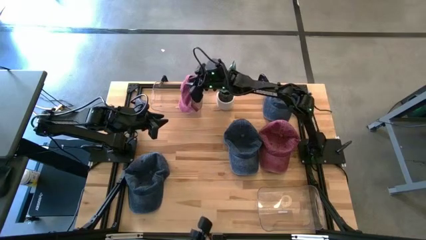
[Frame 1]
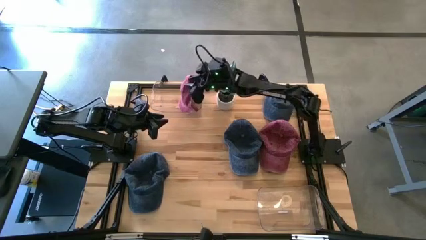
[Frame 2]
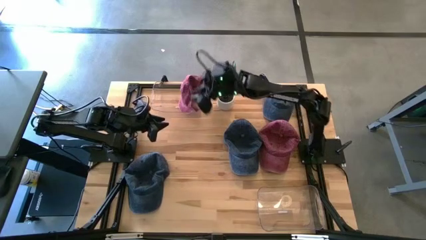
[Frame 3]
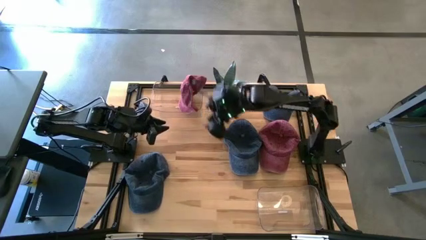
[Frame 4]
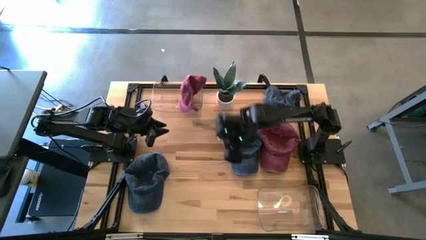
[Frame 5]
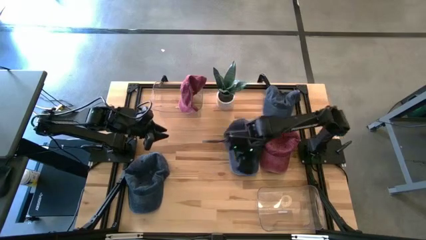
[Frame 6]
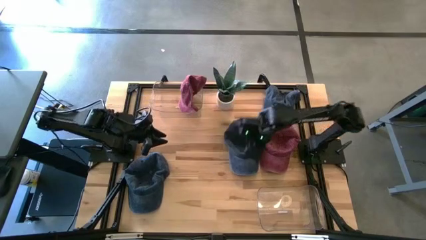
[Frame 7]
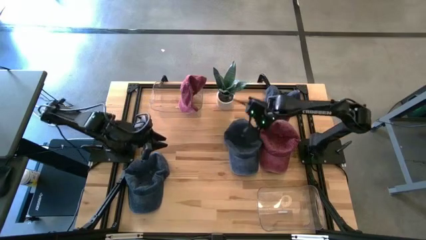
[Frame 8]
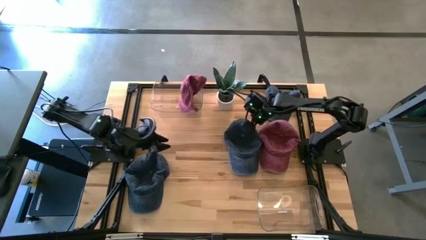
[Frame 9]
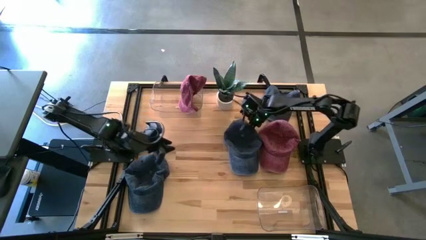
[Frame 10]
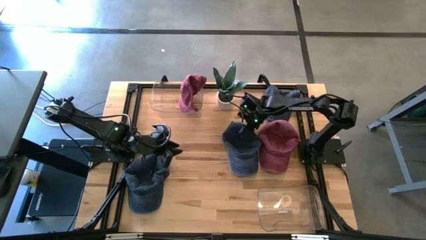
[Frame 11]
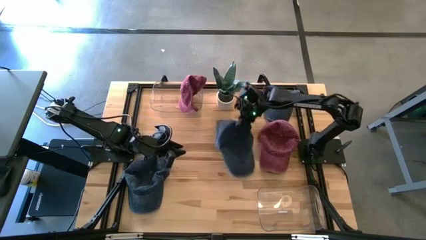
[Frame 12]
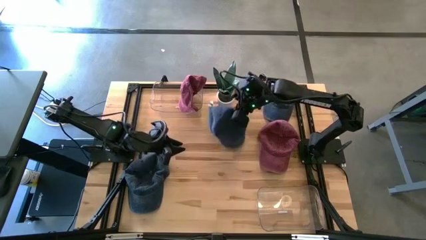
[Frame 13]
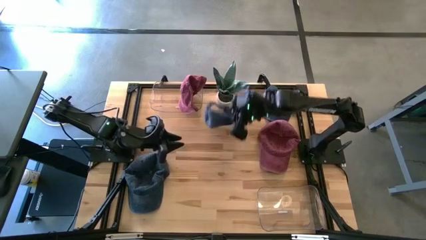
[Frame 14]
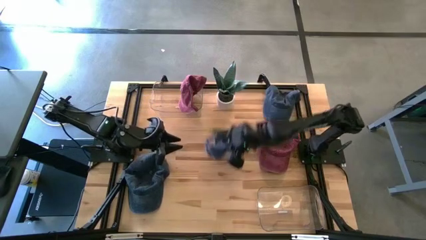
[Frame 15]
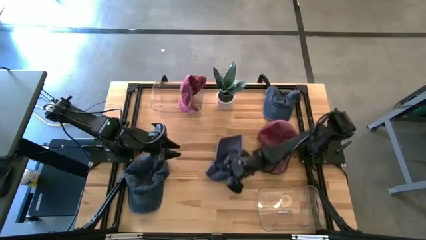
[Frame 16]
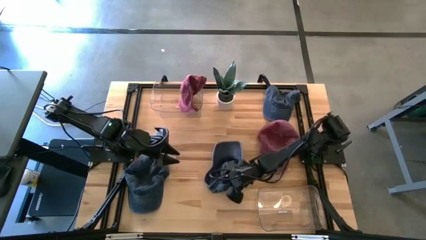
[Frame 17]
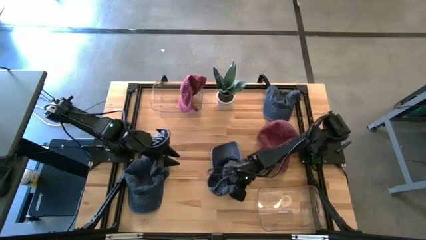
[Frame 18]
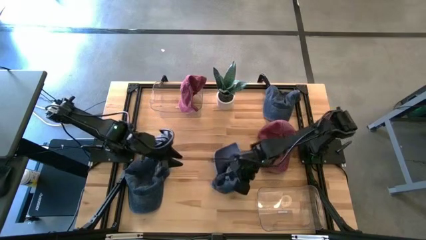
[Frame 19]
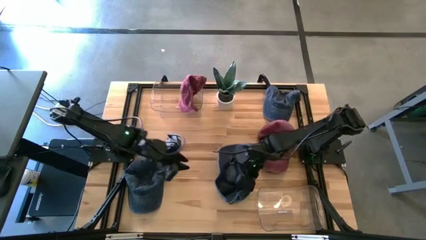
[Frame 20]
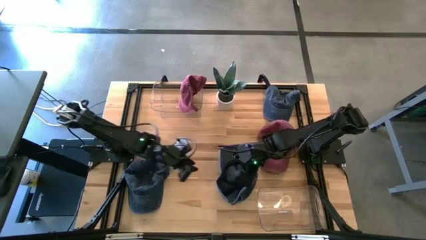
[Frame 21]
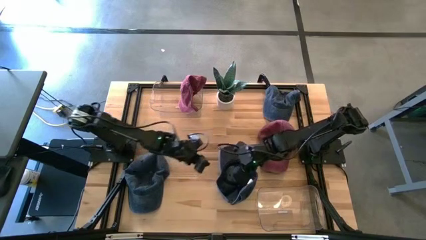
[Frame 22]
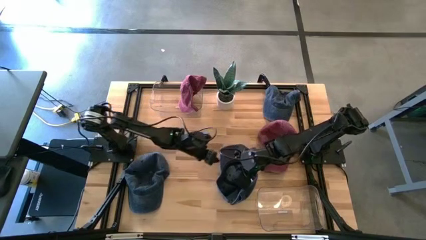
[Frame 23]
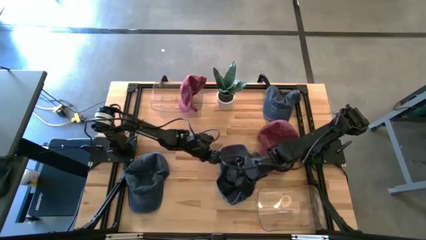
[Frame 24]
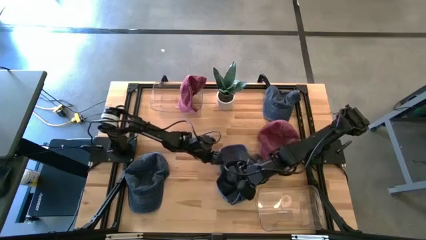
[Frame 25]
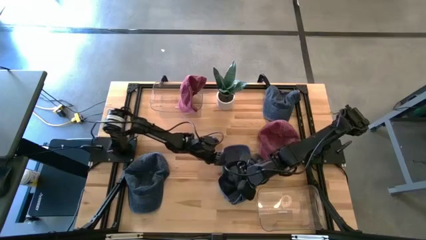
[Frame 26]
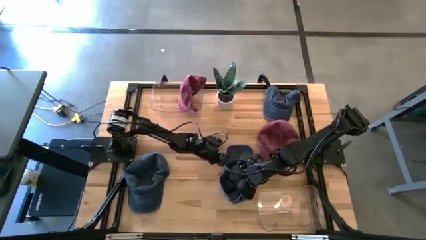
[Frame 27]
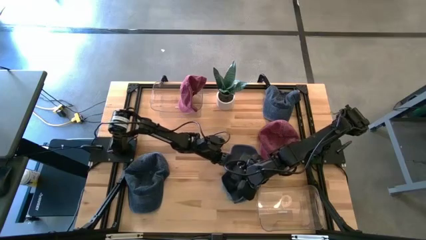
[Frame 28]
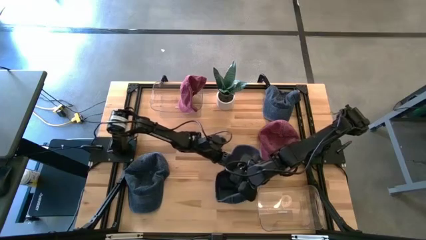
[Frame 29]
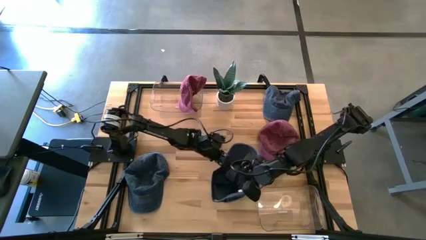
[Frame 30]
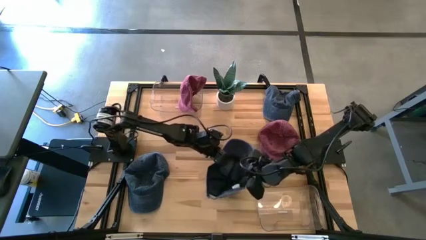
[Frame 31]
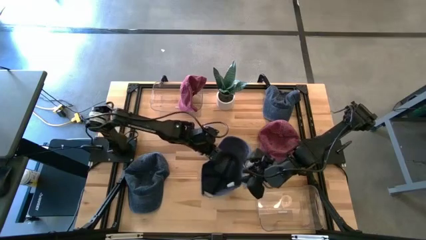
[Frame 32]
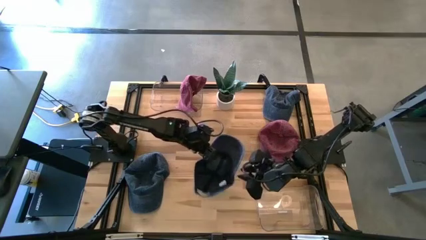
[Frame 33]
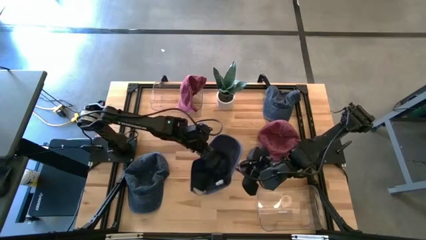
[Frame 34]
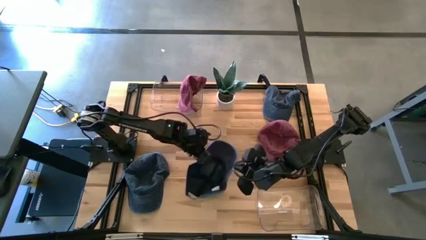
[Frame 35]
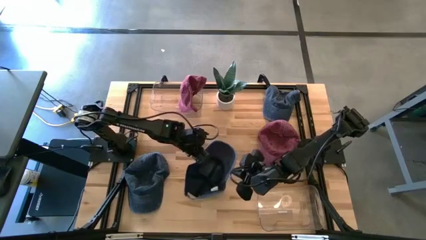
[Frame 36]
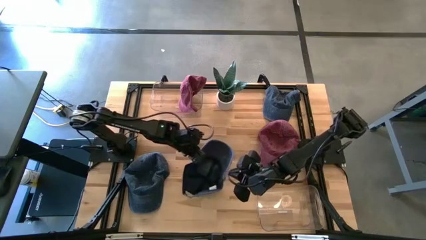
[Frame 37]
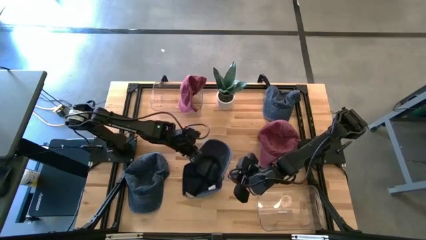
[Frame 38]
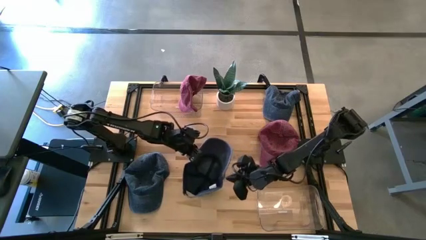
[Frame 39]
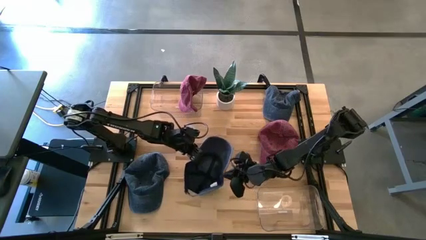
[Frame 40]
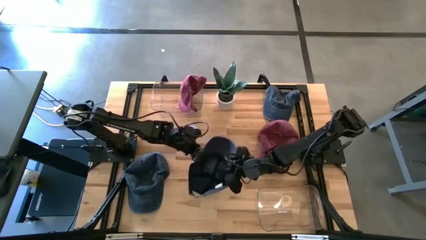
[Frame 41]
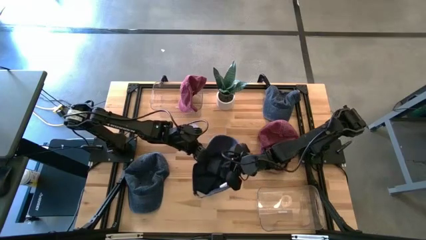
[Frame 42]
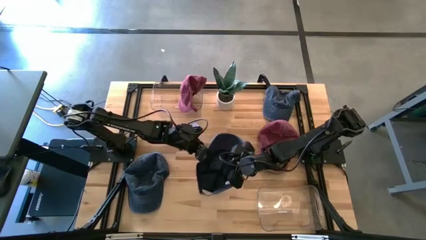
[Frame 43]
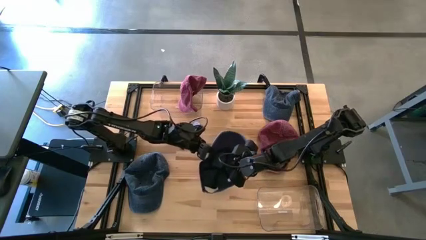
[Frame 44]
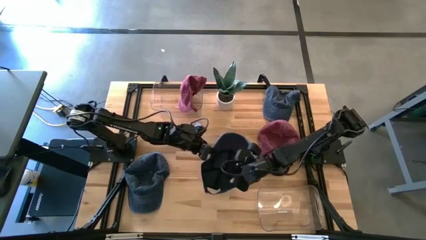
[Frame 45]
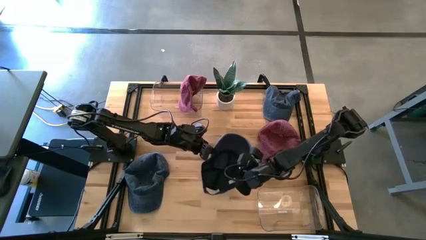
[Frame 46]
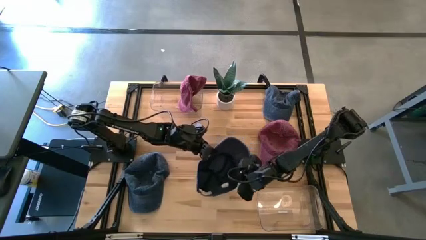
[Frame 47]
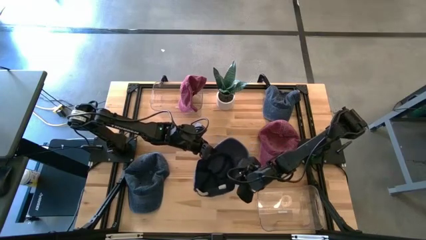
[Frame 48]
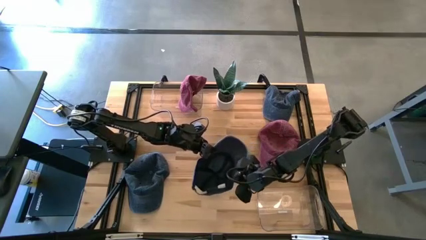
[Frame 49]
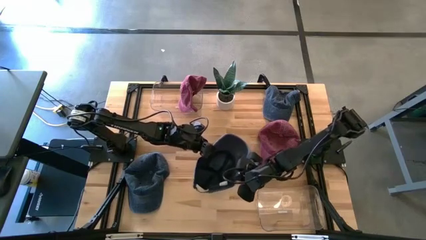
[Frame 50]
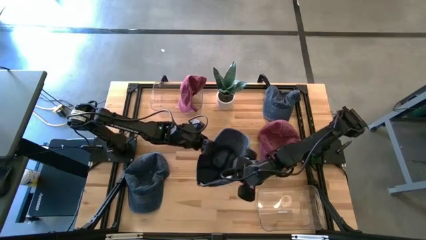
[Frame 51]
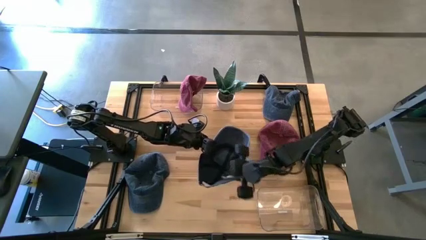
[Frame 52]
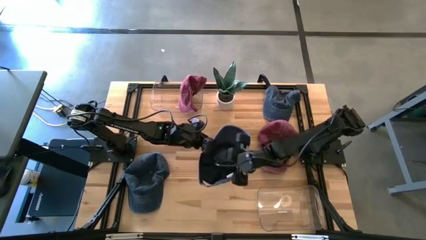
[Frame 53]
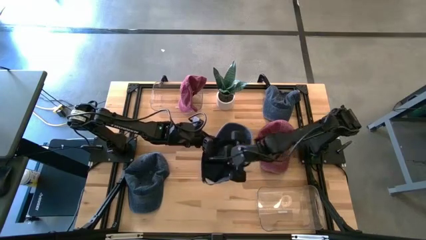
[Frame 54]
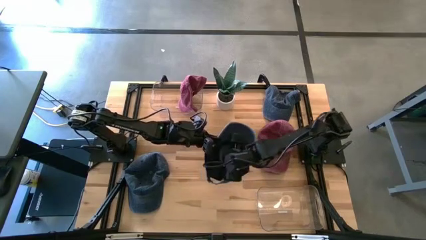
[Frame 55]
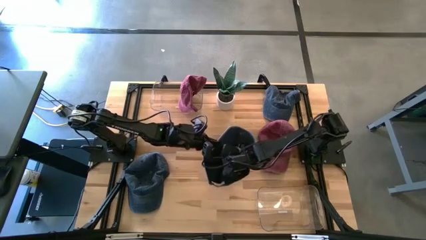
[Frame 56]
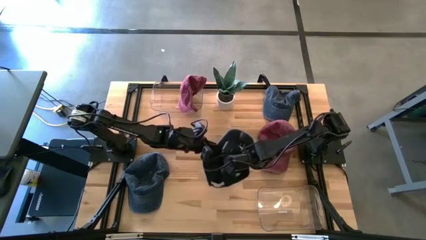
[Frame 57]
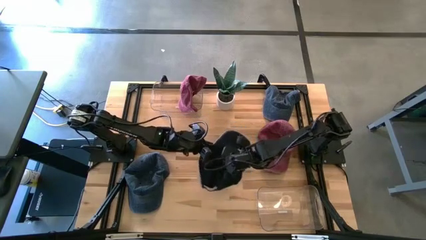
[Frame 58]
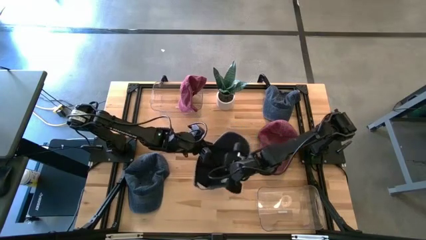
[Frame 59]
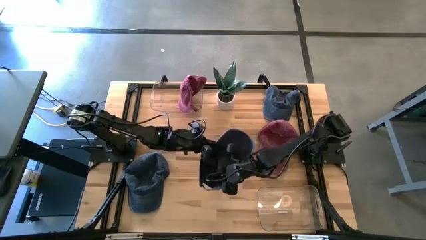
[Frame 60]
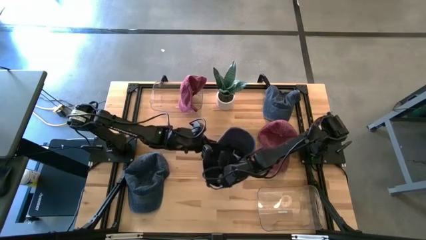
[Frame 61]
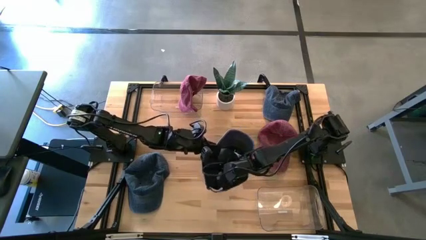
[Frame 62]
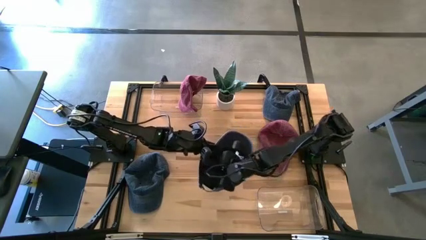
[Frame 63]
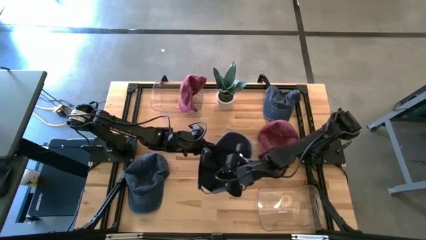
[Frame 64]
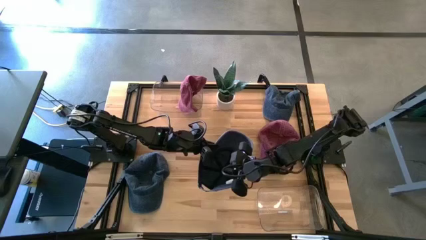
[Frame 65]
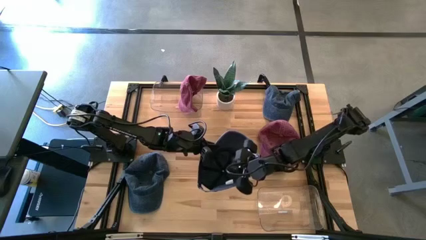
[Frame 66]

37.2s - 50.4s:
Task: Pick & Place hat
Put the middle blue cap into the bottom transparent bin

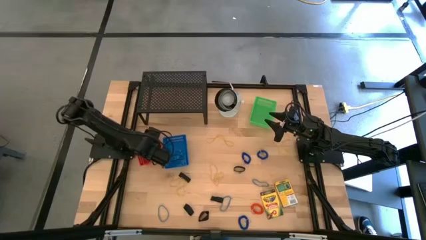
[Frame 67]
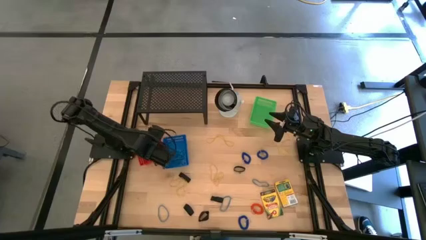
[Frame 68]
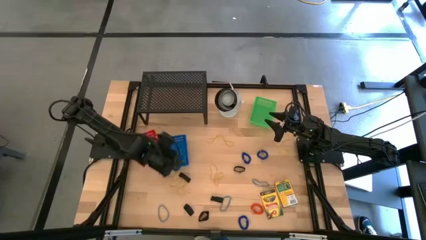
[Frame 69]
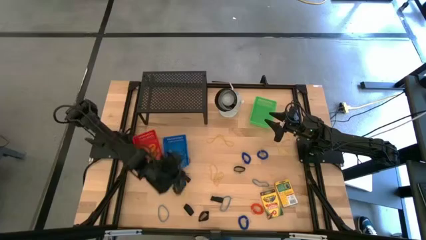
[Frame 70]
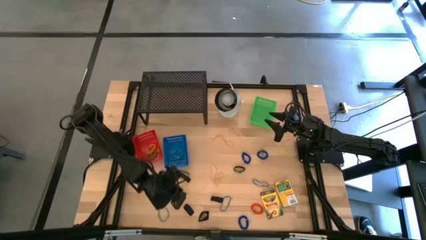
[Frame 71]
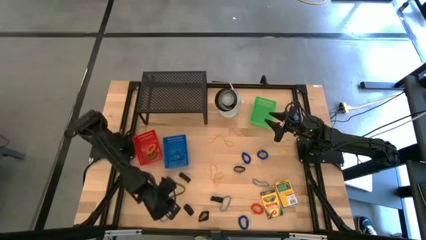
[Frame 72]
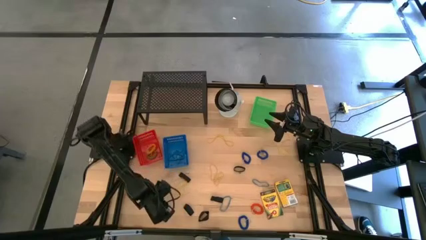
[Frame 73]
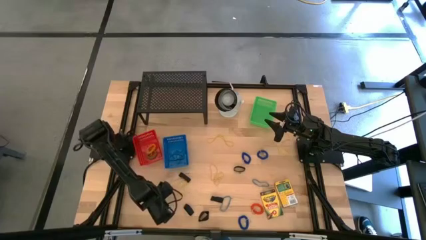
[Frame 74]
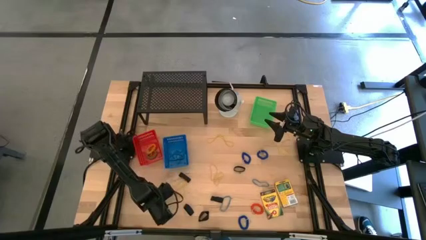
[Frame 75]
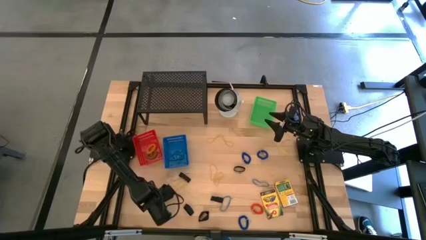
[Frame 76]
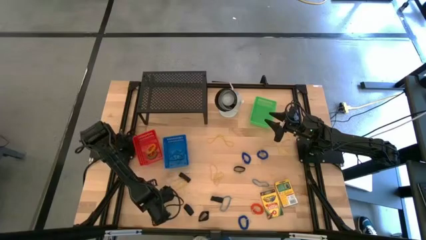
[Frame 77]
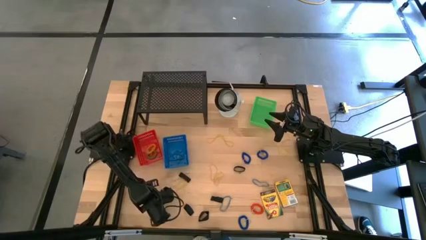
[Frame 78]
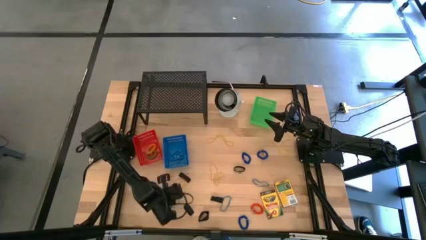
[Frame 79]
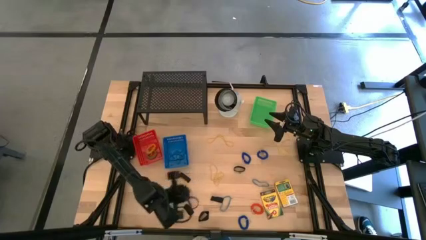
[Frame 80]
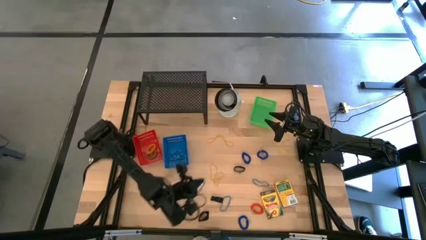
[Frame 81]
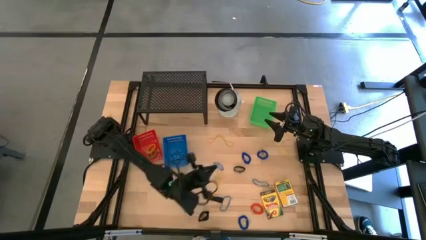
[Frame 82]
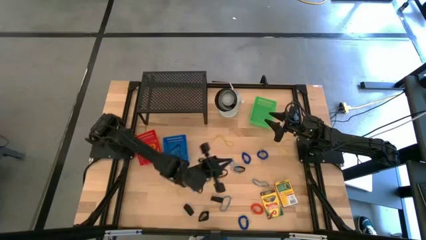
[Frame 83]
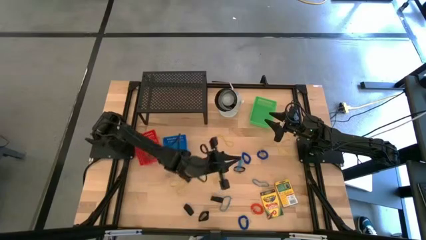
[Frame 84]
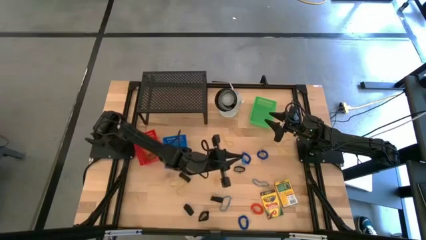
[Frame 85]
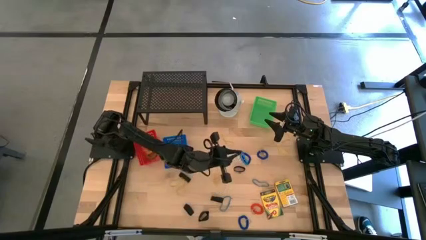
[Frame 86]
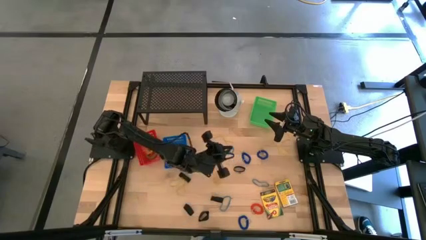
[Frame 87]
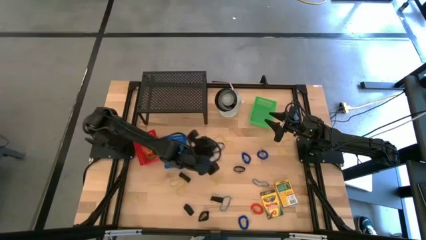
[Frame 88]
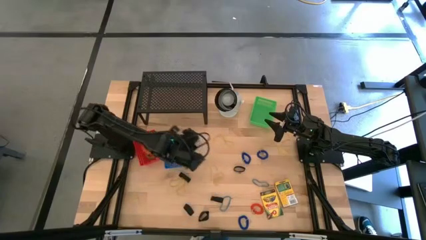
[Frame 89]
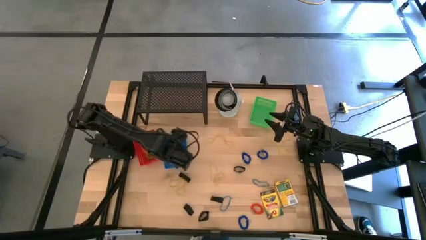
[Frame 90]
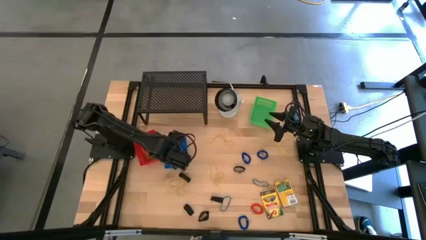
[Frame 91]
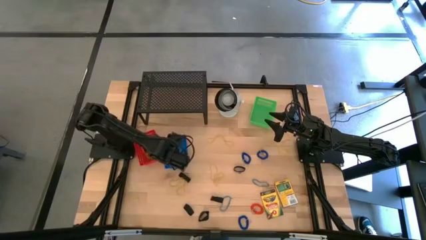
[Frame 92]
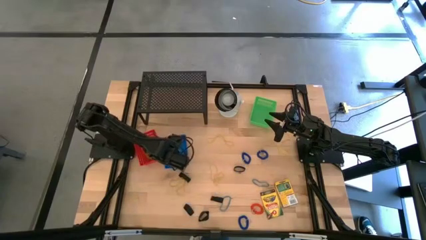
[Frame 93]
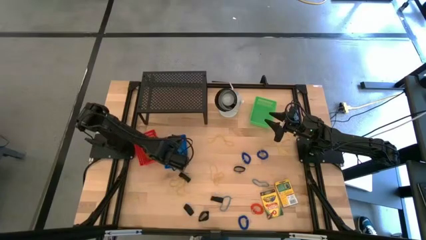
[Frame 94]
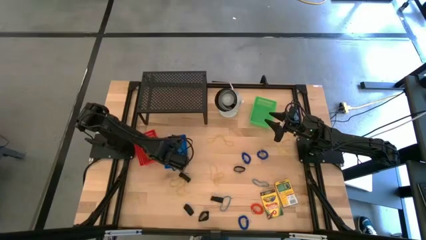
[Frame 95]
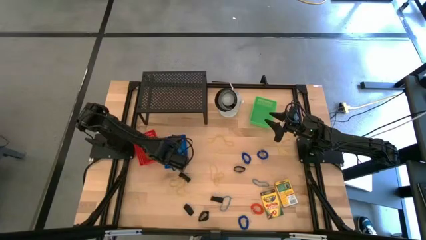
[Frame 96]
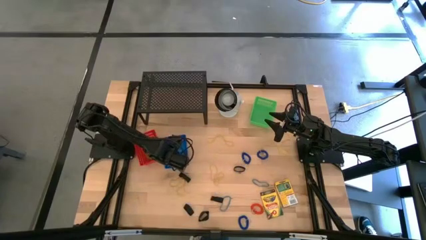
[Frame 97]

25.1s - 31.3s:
Task: Pick & Place Office Desk Supplies
Put the blue rubber band into the blue bin
